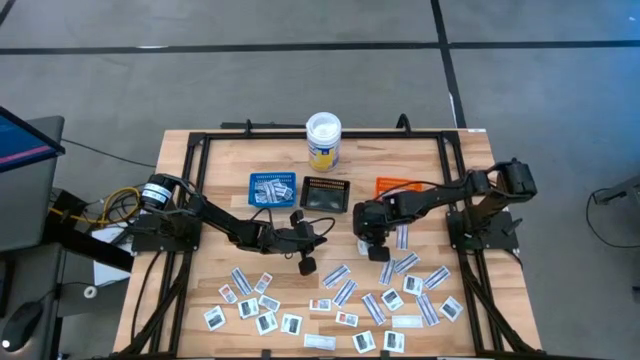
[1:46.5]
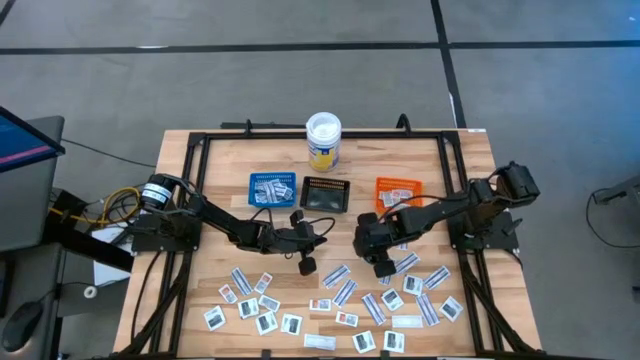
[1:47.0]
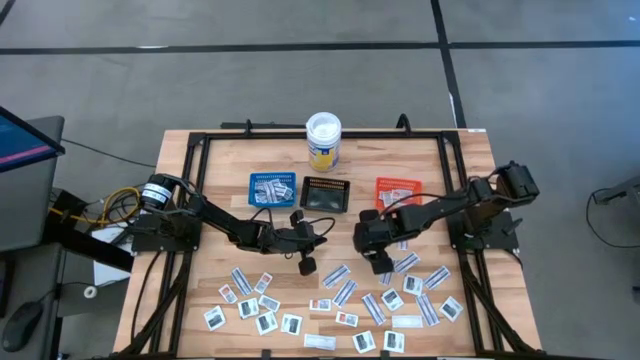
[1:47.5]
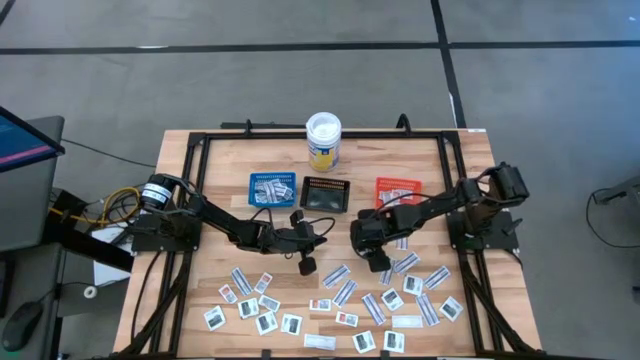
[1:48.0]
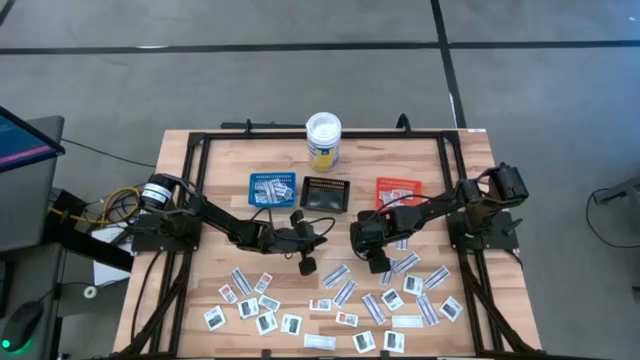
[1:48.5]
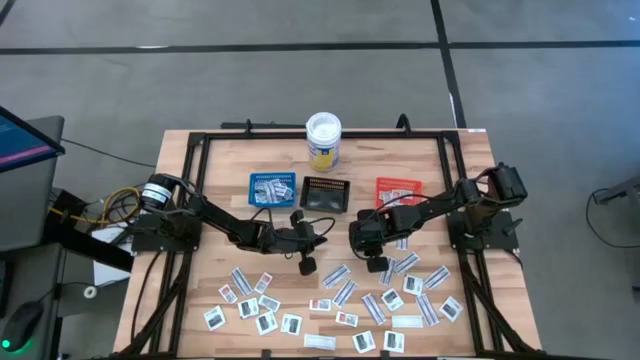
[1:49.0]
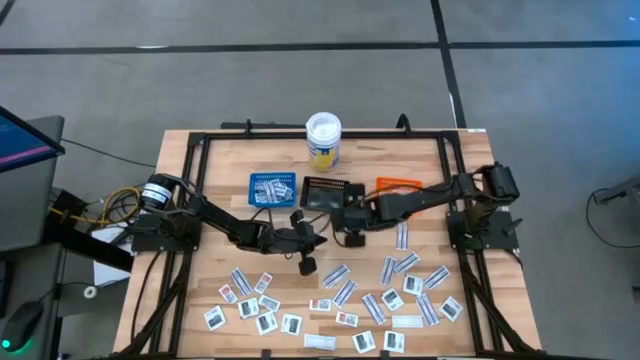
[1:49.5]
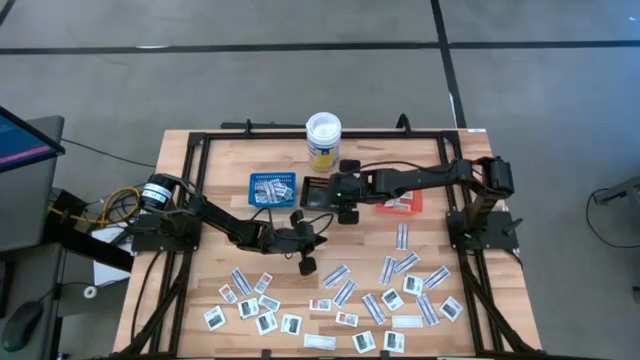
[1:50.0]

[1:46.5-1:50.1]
Task: Pick & Place First Aid Supplies
Put the black towelette pack into the black bin

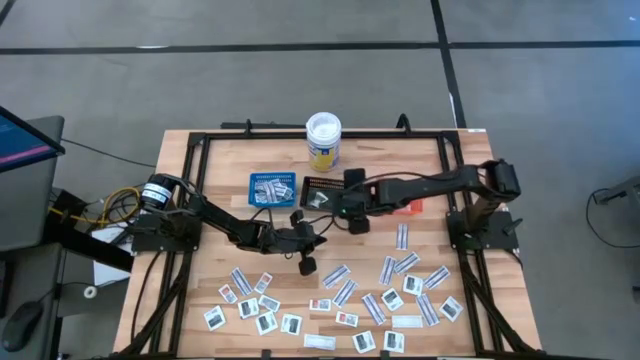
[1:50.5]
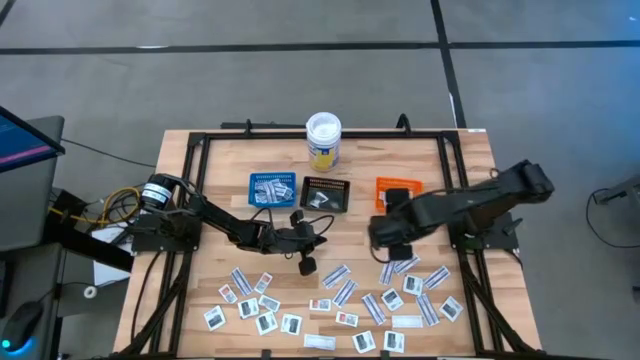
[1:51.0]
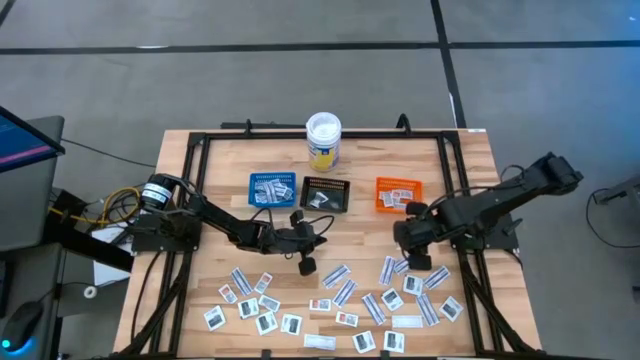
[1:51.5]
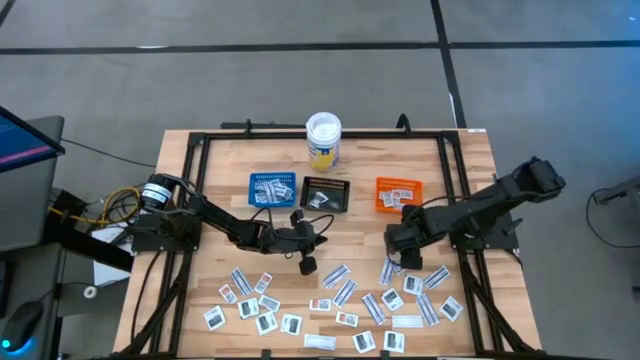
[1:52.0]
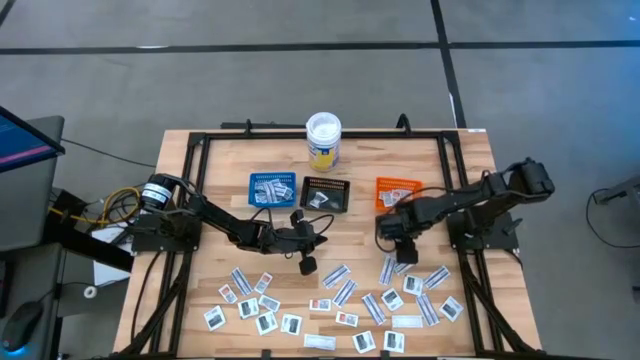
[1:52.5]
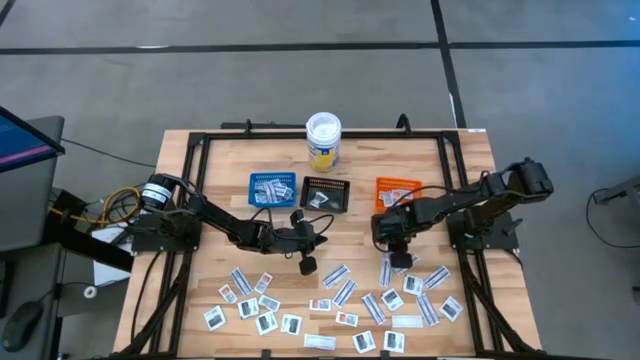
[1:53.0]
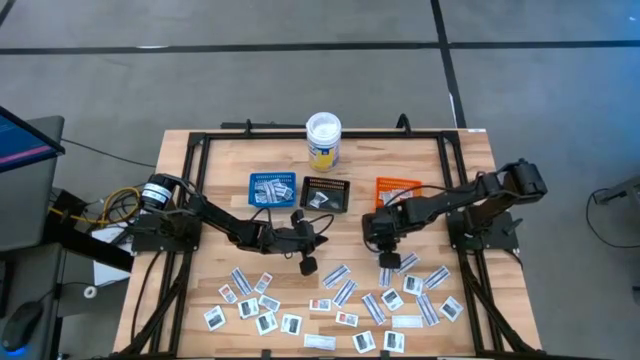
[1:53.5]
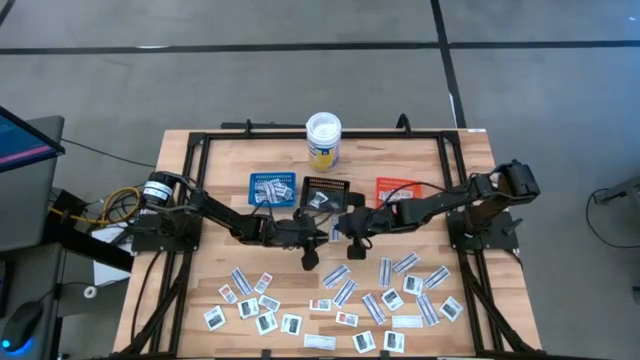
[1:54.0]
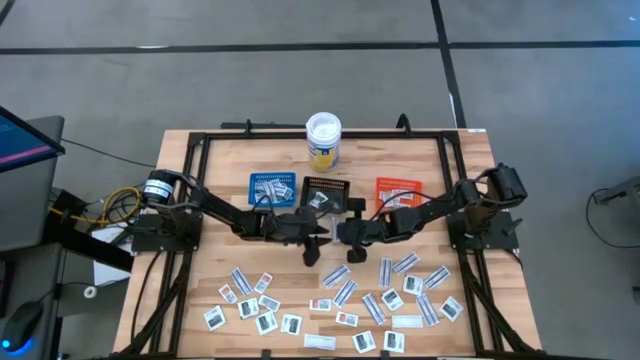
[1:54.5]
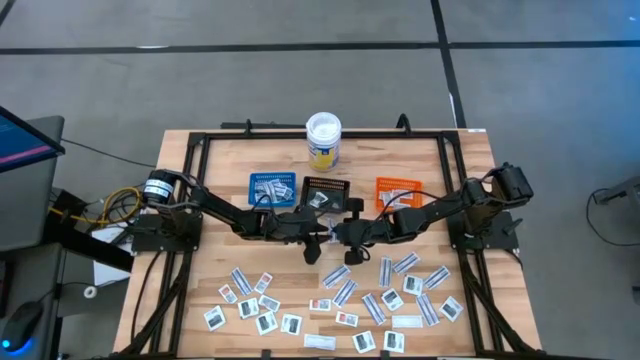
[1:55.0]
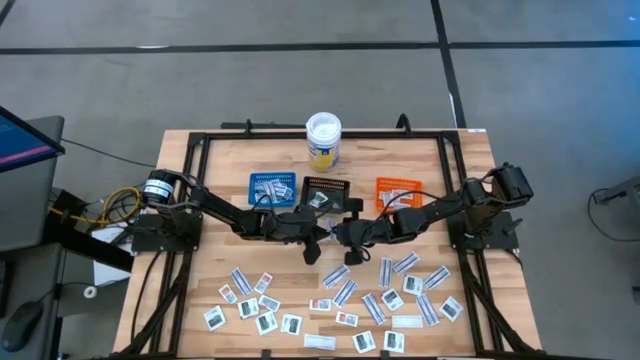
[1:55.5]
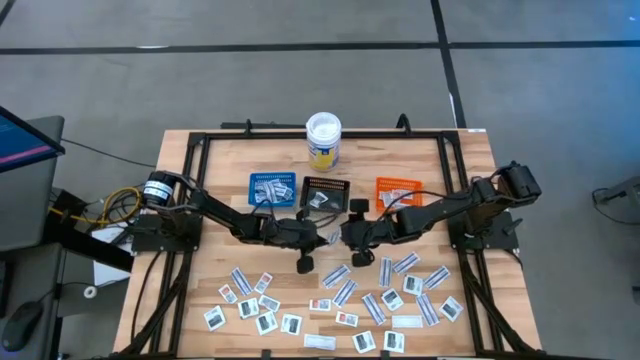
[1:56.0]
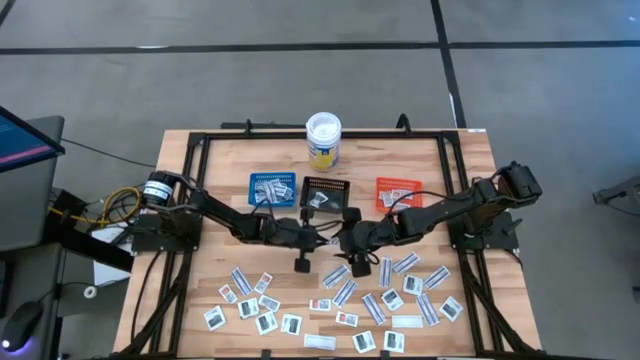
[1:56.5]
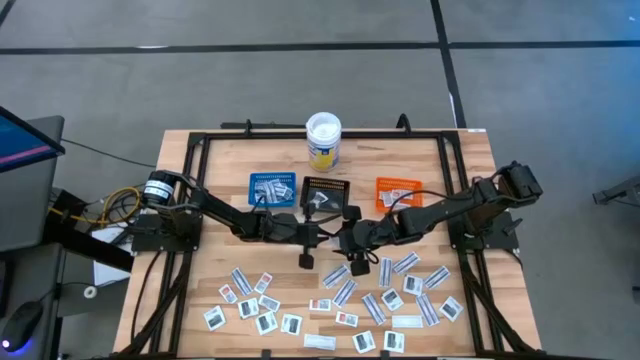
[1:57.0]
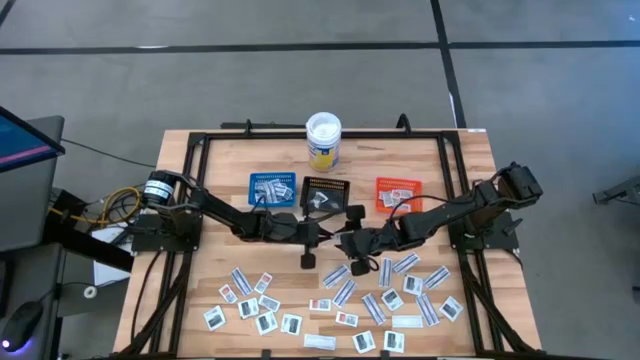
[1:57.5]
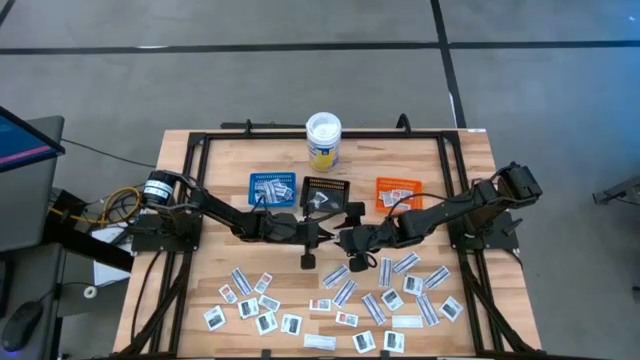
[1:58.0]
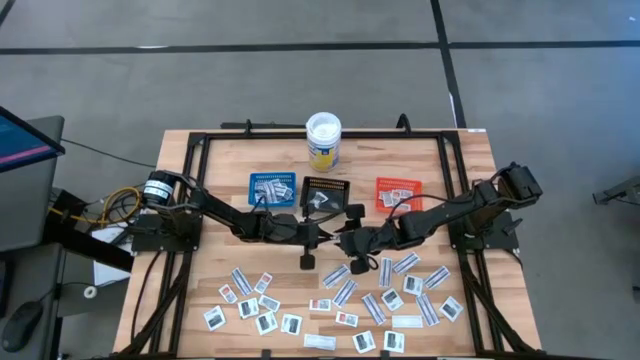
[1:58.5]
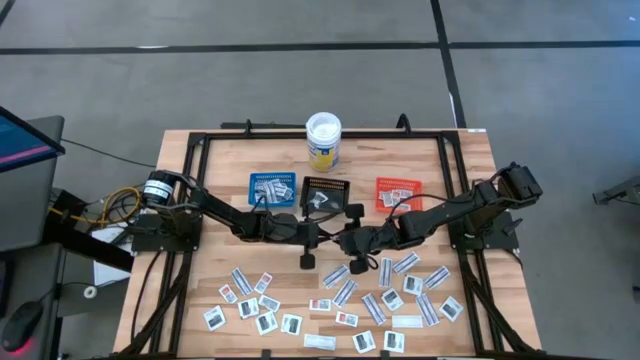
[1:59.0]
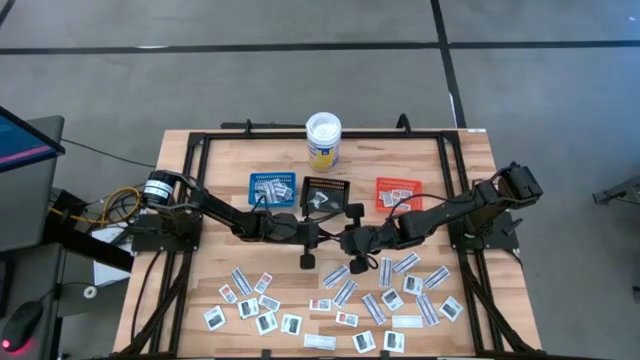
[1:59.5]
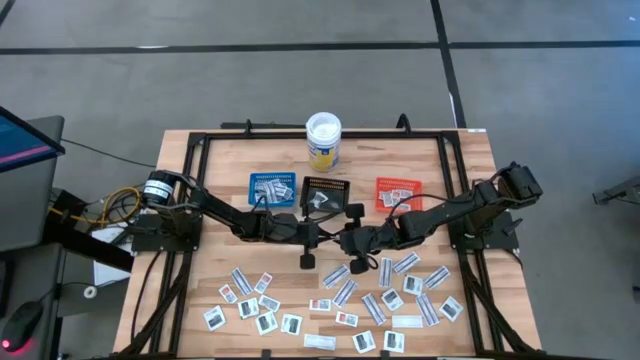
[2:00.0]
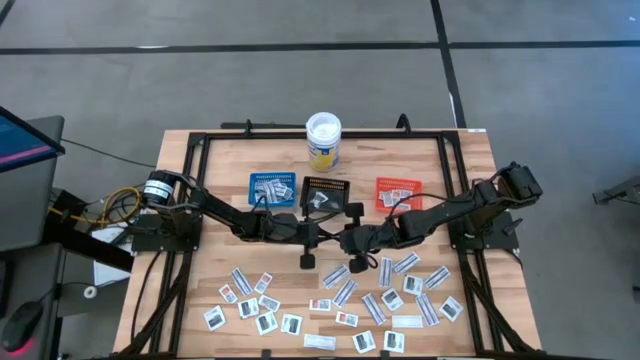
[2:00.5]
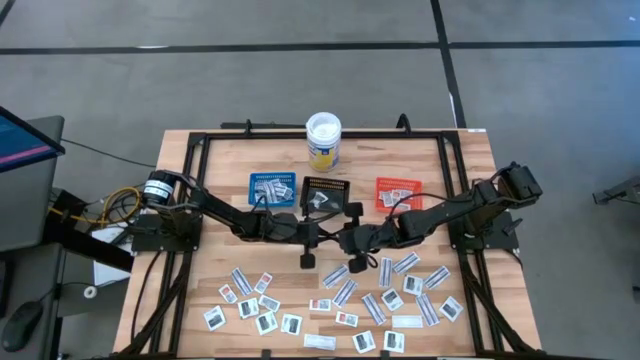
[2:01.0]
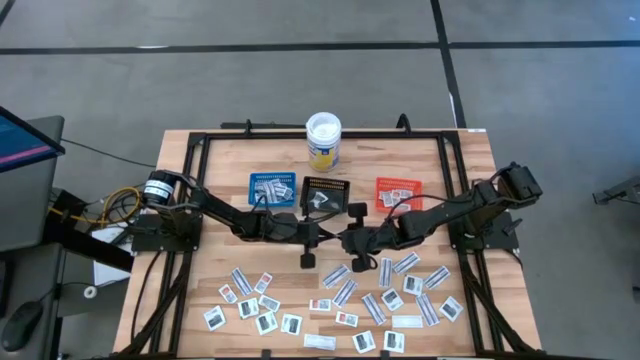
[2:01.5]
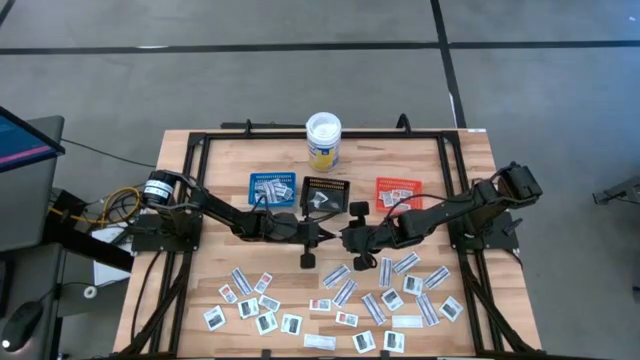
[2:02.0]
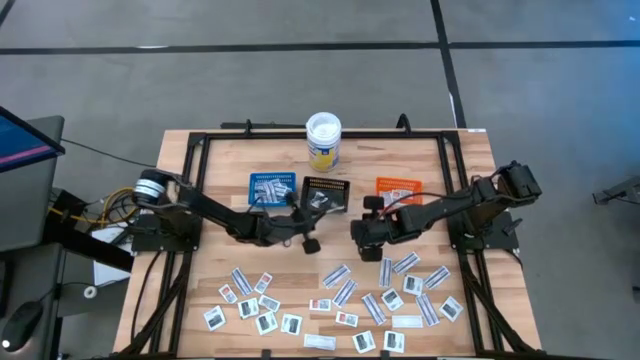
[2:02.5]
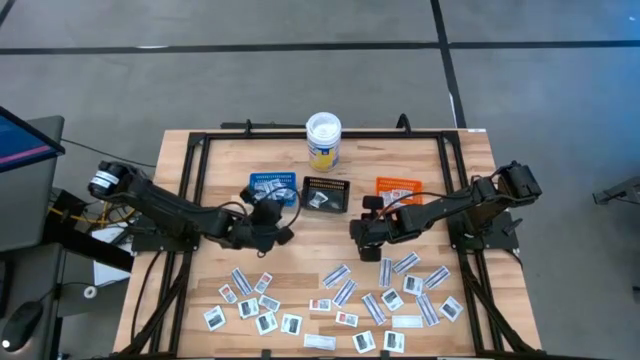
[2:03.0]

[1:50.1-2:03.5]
Put the blue bandage into the blue bin

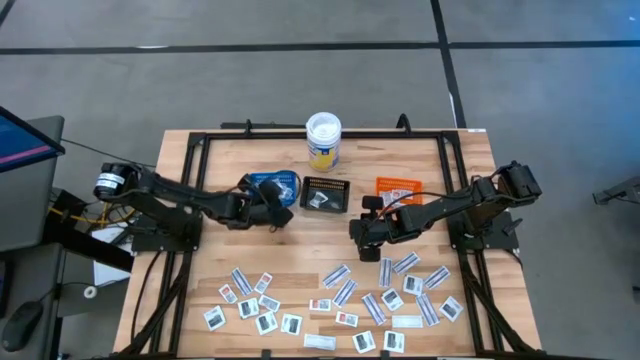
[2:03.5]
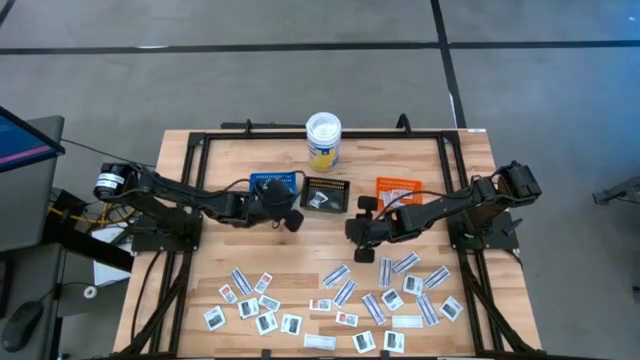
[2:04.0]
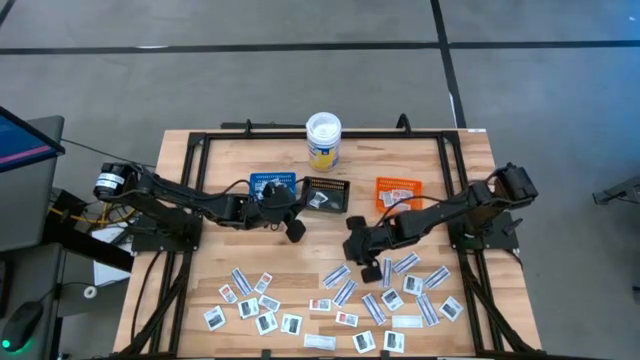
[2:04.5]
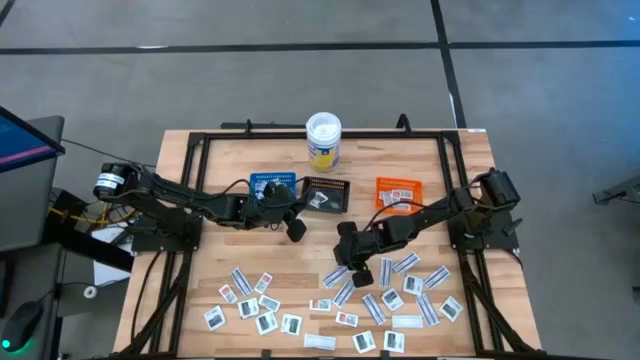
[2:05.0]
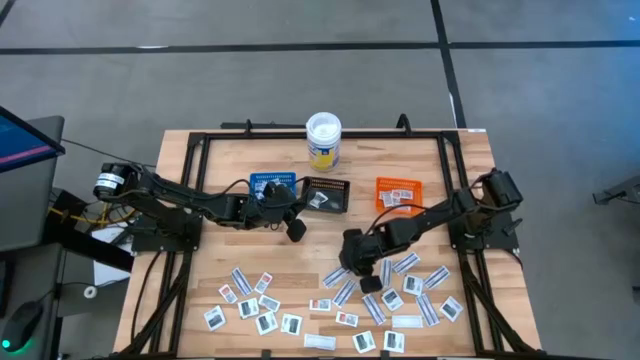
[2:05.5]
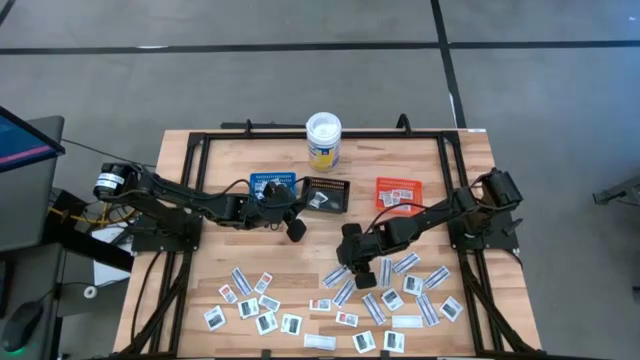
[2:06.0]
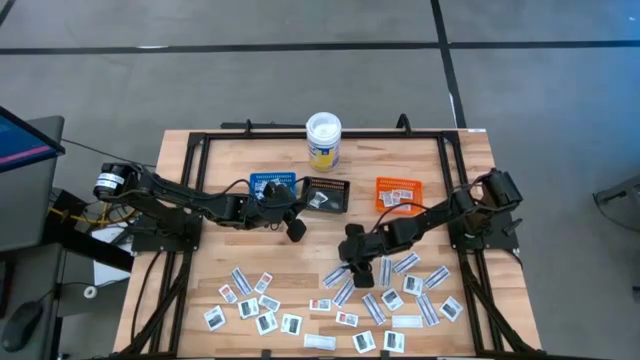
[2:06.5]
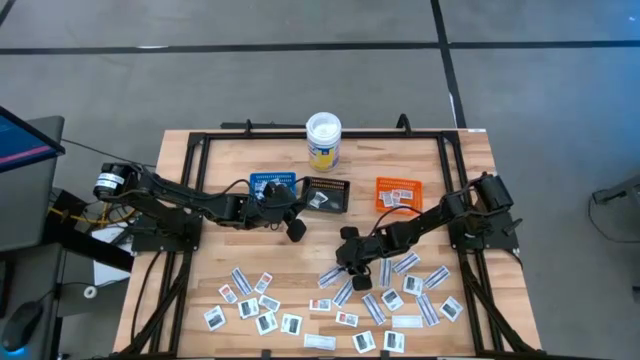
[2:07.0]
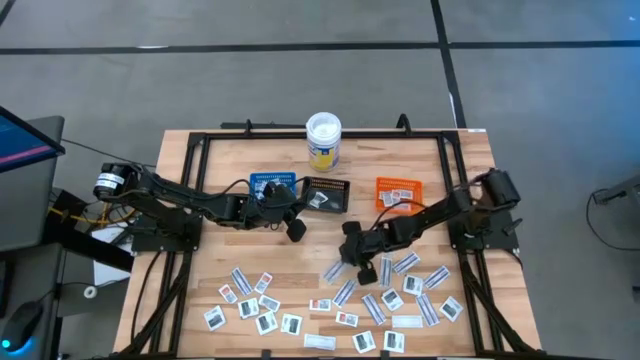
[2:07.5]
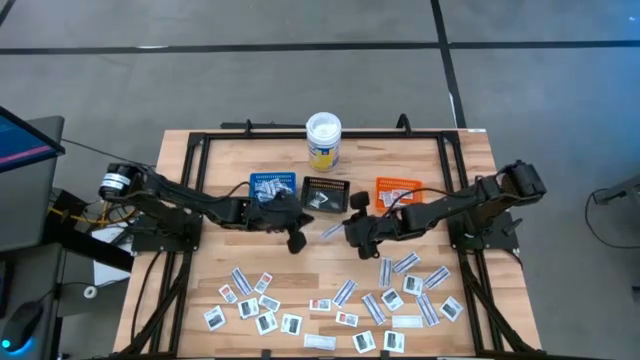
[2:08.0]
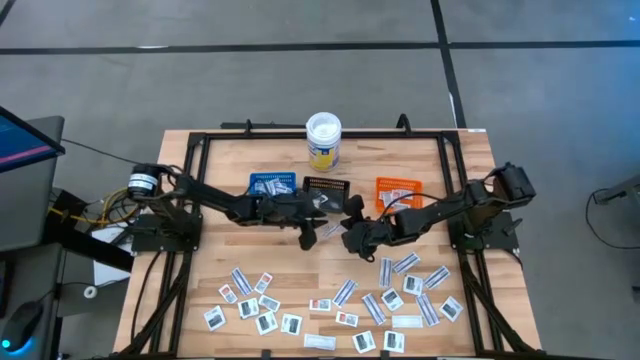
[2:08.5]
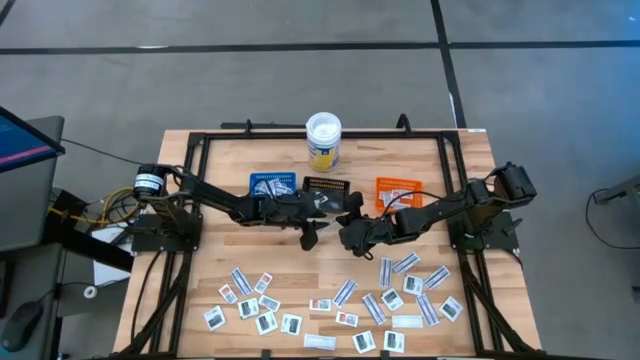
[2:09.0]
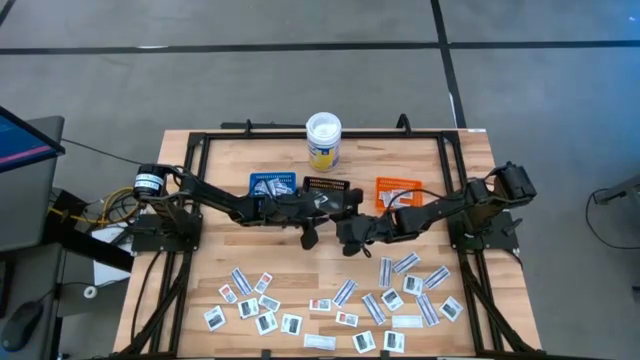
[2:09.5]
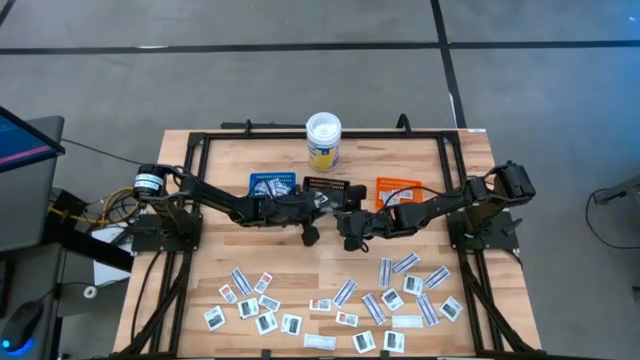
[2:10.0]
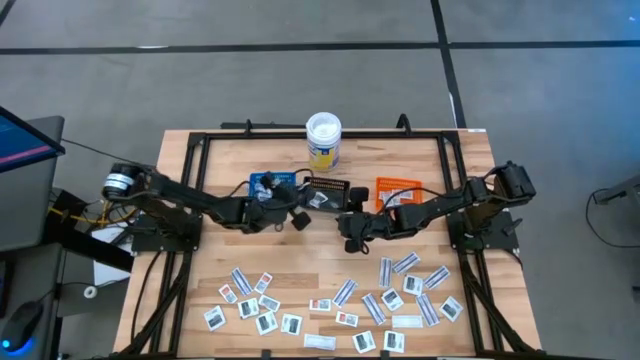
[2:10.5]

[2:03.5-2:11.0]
Put the blue bandage into the blue bin
